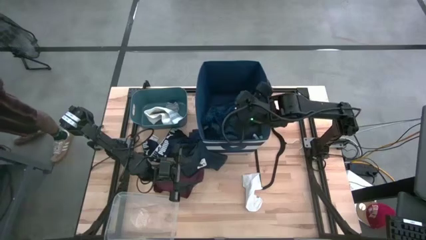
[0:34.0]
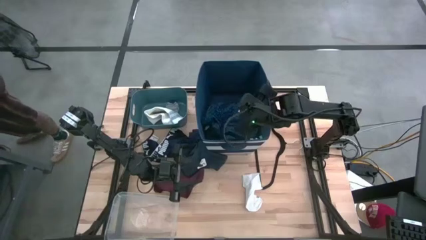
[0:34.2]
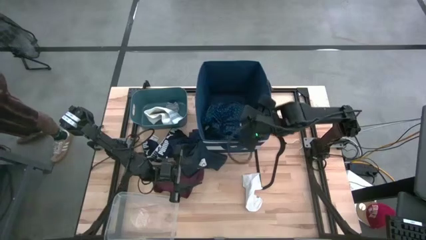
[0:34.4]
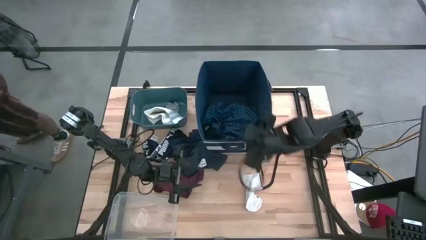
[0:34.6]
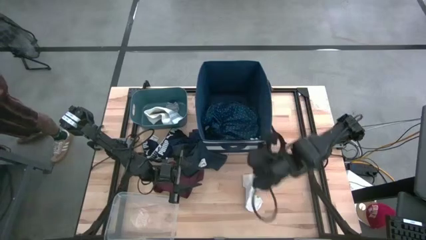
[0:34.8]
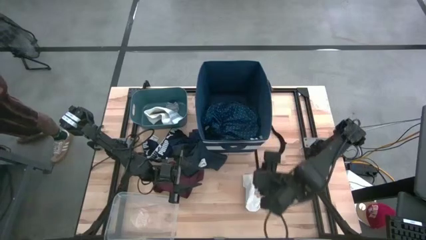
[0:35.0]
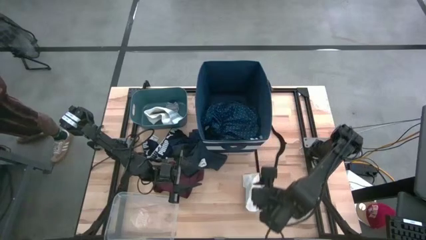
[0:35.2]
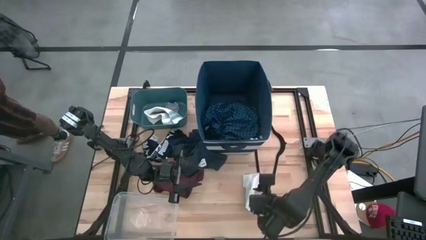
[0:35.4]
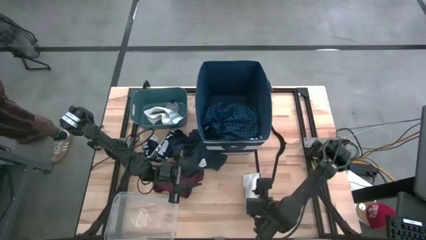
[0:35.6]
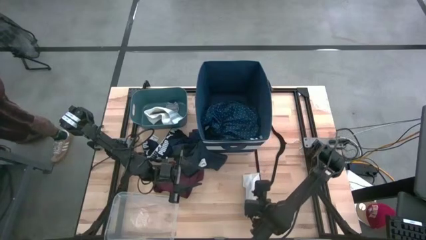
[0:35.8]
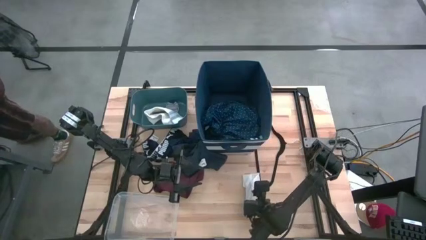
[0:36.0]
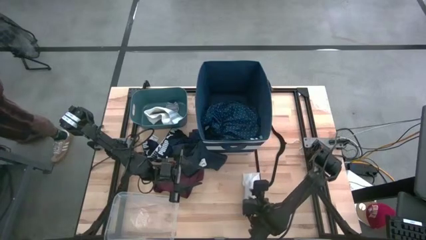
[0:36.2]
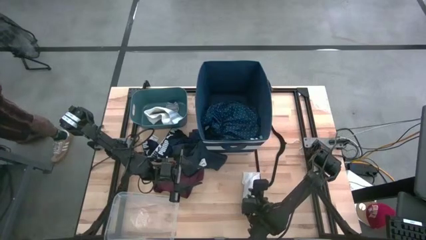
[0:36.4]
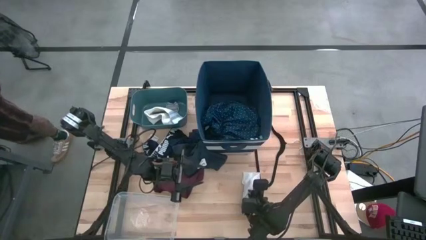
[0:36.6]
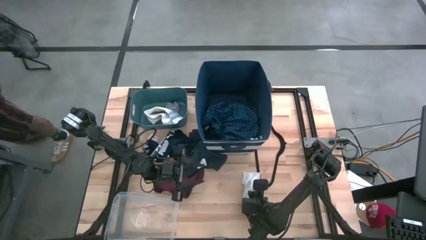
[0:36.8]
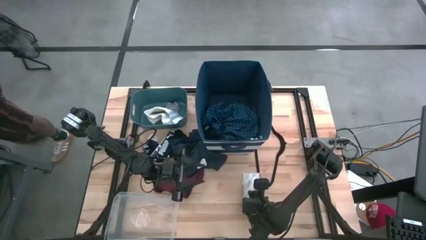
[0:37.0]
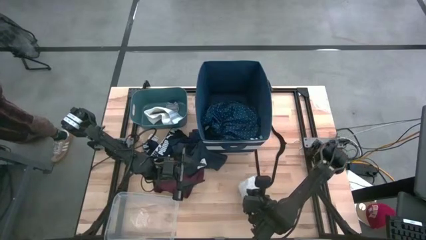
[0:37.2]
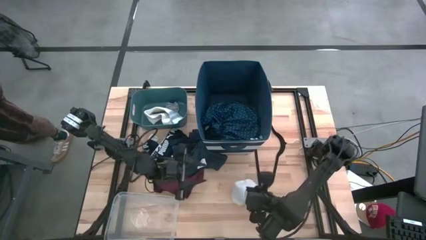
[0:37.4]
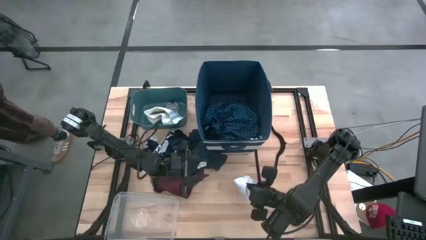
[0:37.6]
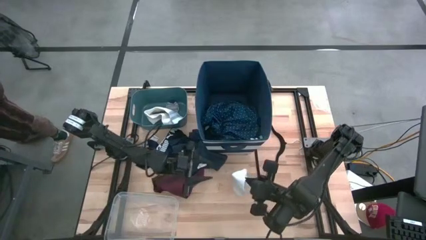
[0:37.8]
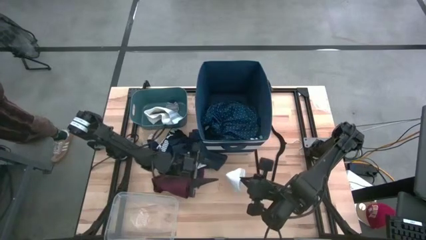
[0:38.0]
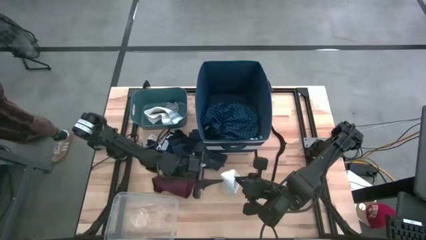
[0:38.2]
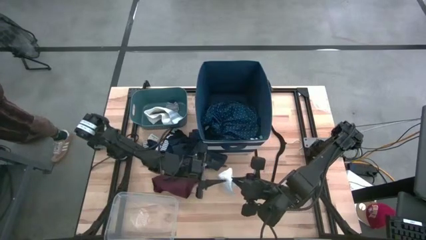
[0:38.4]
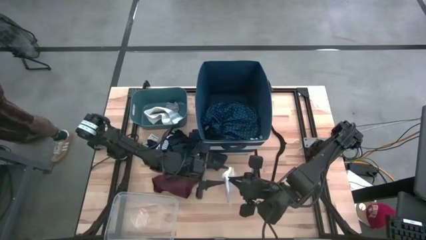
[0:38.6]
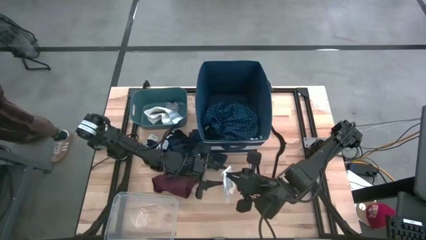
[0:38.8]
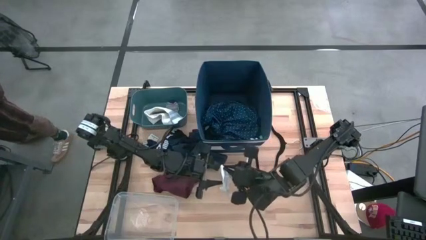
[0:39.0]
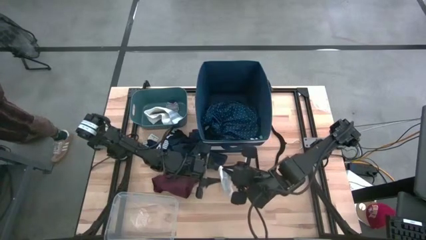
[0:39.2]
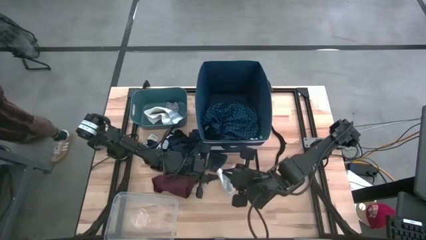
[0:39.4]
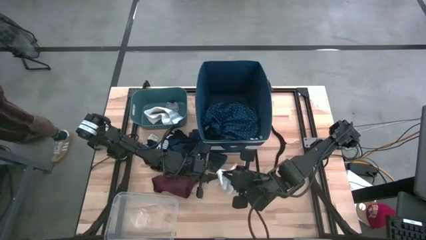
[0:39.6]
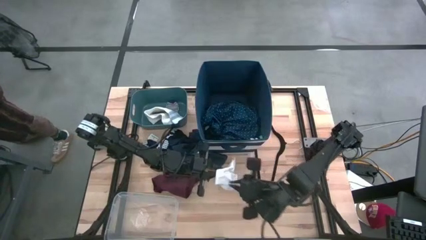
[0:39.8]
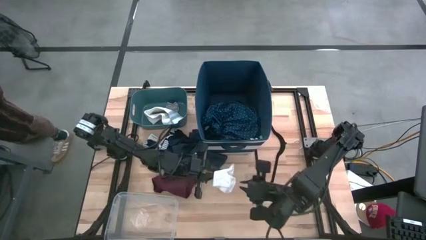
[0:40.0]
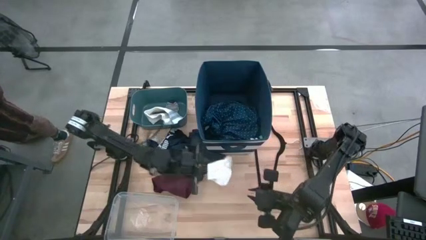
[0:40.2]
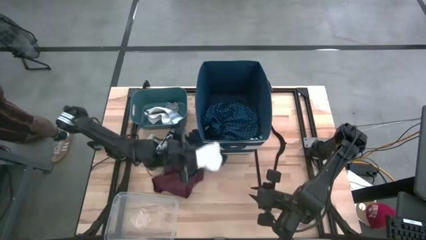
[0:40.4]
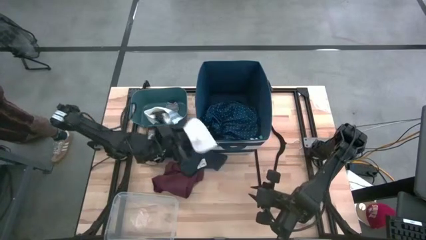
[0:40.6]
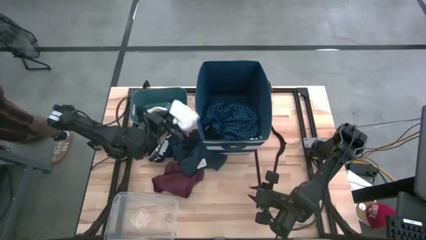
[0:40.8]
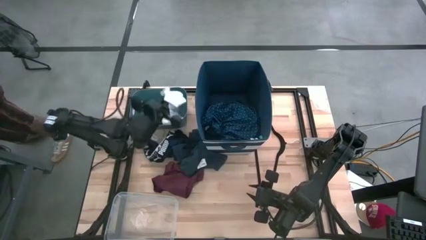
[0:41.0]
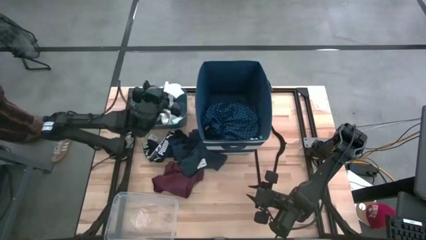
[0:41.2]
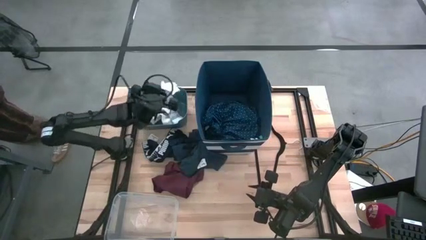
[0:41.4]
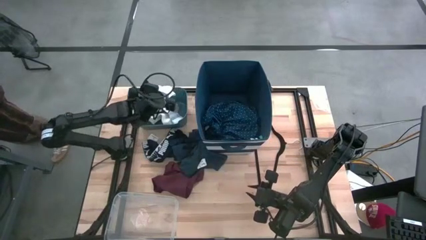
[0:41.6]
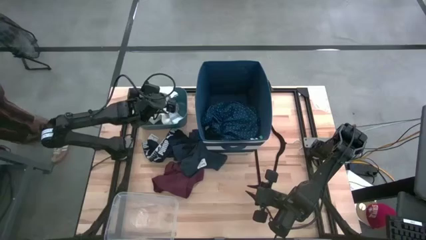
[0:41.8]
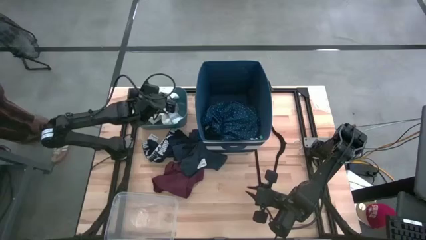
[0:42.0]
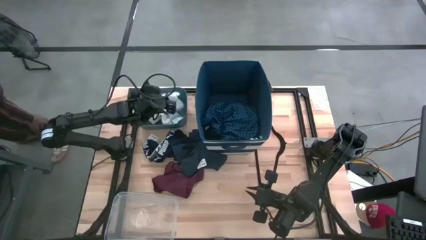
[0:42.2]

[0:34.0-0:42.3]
Task: Pick & Place Cloths
Put the white sock into the blue bin

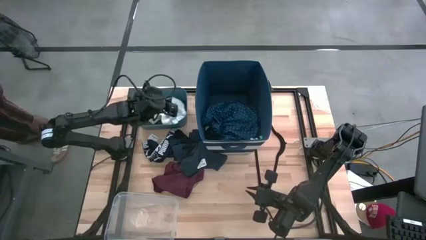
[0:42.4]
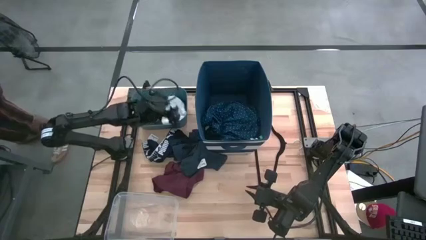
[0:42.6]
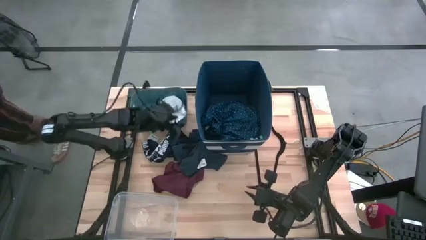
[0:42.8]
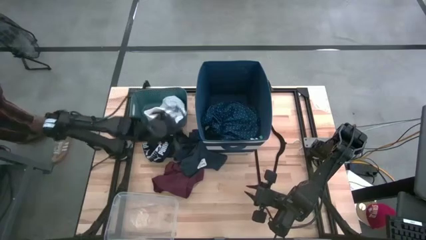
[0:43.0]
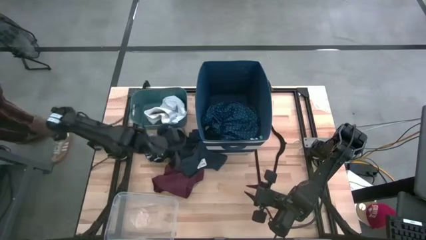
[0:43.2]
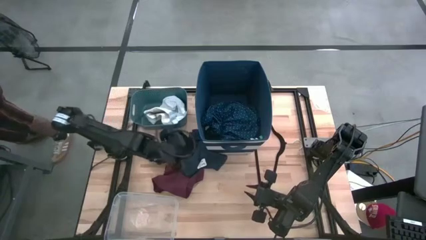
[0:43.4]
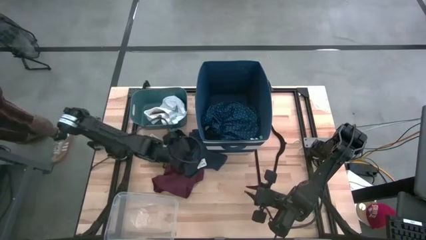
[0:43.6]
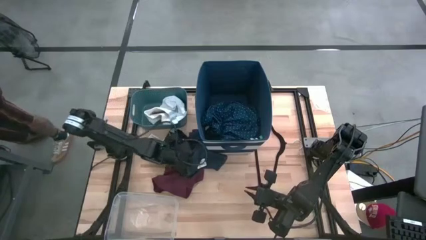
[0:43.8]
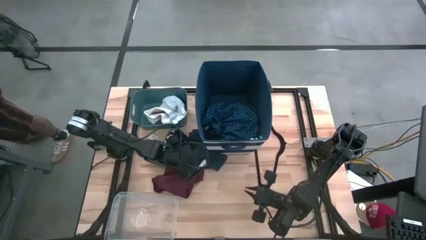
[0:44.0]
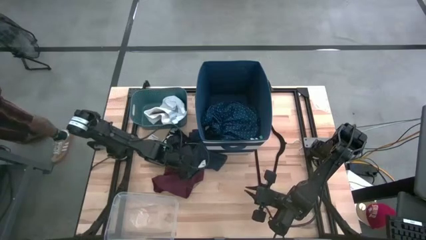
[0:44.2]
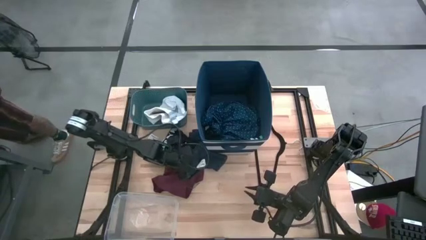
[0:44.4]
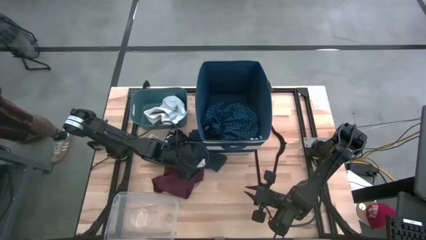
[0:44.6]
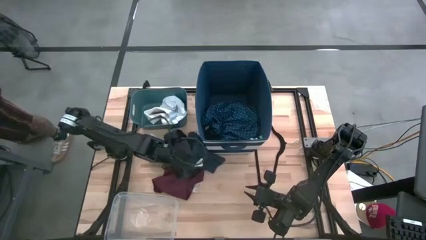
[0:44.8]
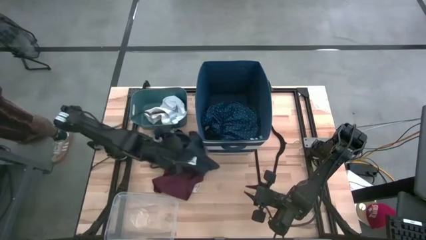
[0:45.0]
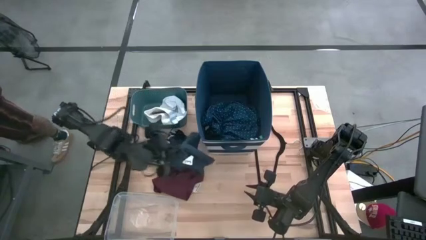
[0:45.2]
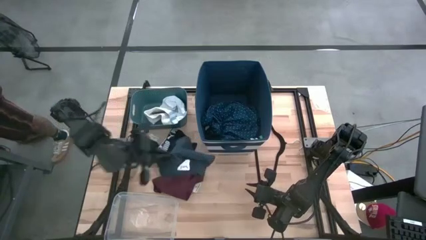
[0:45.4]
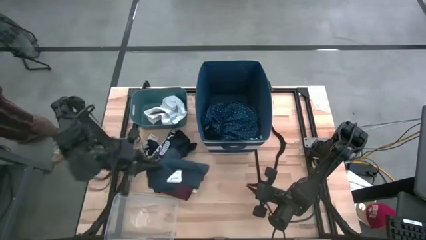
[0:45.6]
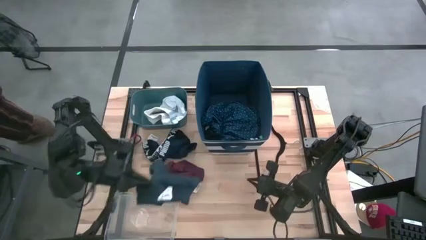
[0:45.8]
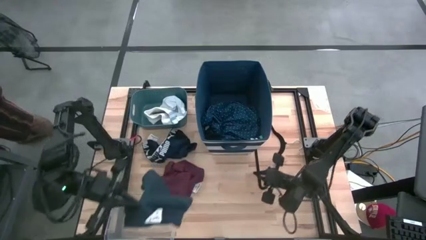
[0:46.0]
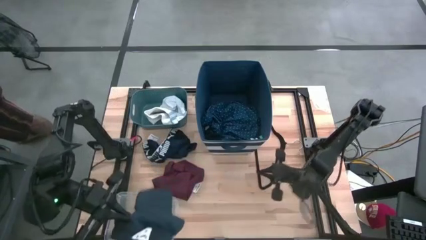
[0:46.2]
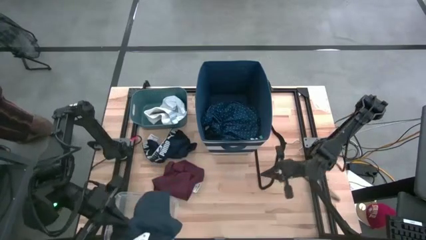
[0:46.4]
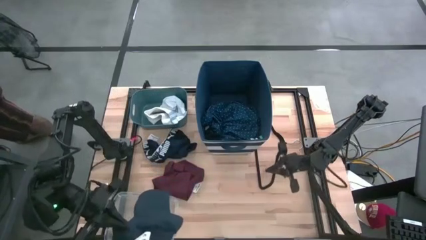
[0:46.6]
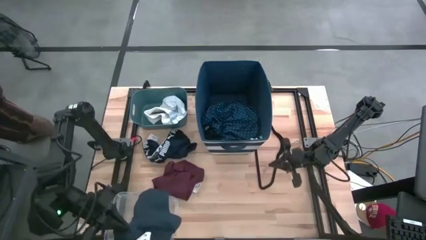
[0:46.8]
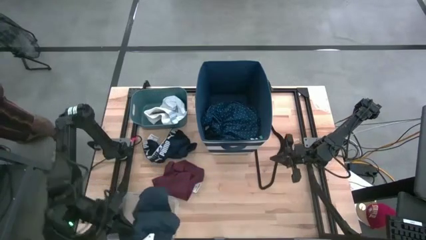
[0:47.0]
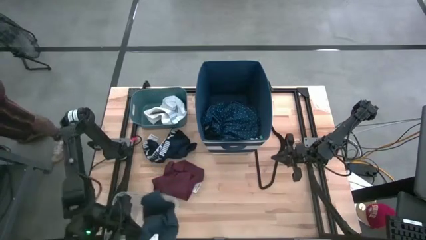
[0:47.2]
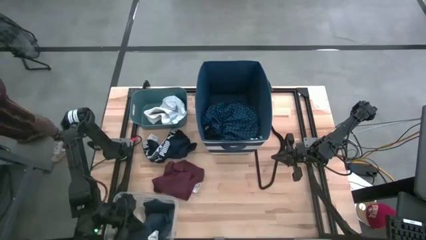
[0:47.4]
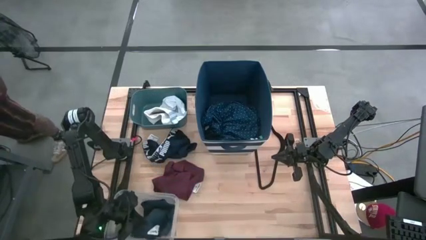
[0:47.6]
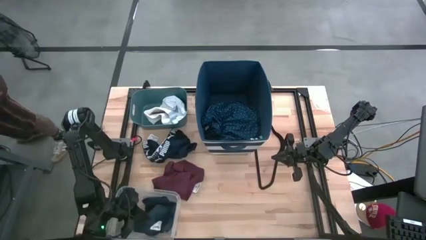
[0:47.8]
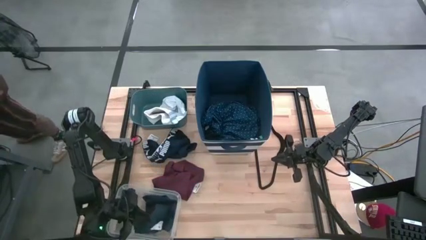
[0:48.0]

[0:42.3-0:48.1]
Put the dark blue shorts into the transparent bin

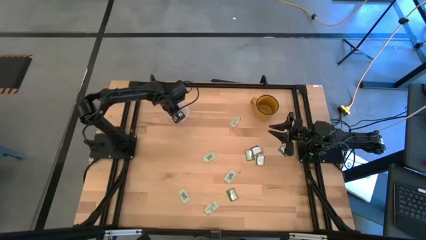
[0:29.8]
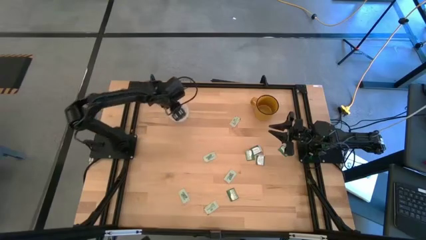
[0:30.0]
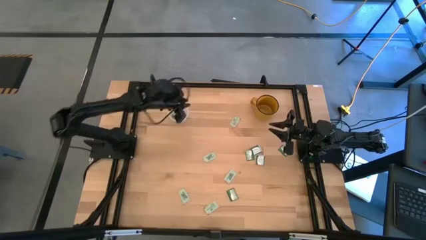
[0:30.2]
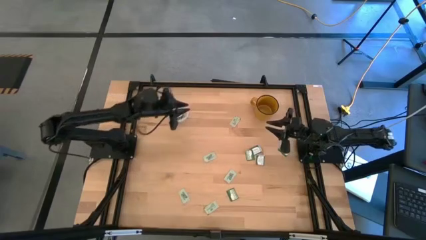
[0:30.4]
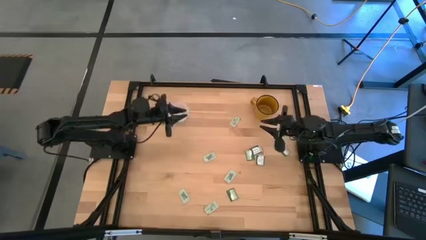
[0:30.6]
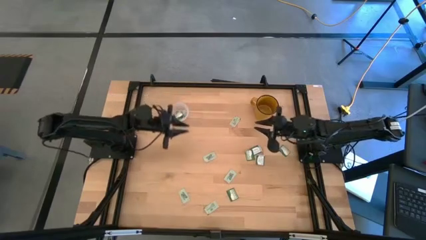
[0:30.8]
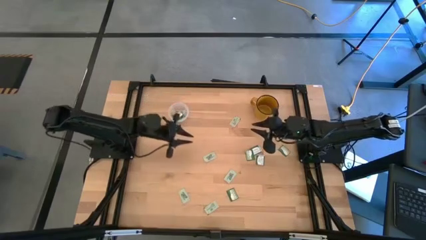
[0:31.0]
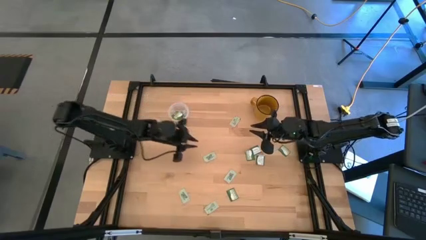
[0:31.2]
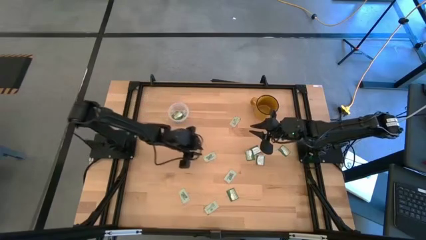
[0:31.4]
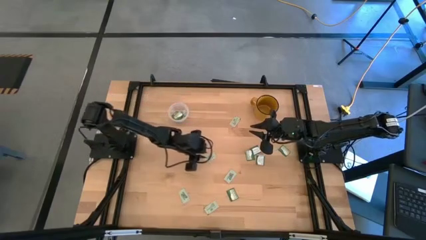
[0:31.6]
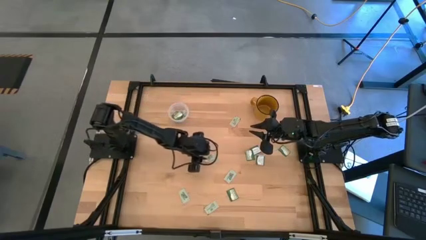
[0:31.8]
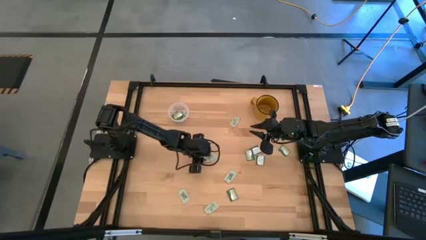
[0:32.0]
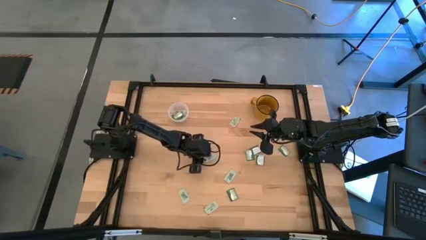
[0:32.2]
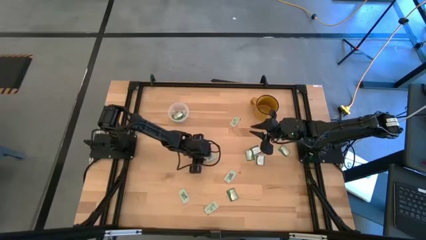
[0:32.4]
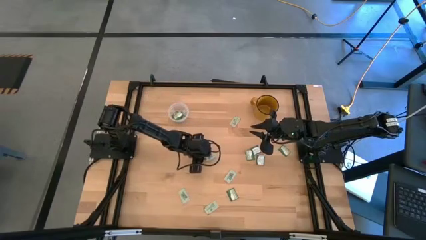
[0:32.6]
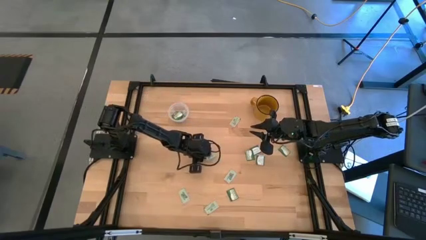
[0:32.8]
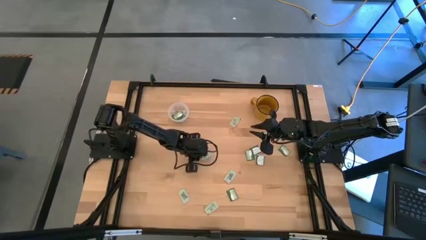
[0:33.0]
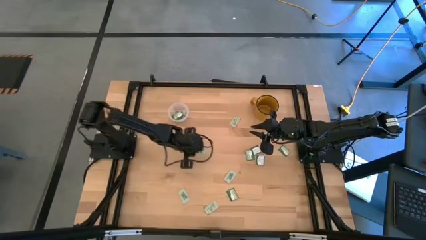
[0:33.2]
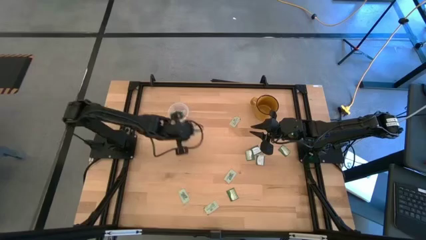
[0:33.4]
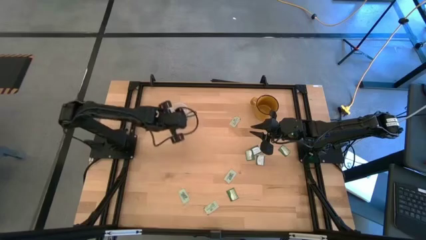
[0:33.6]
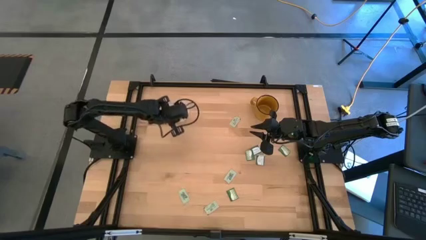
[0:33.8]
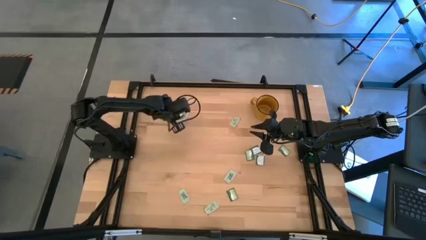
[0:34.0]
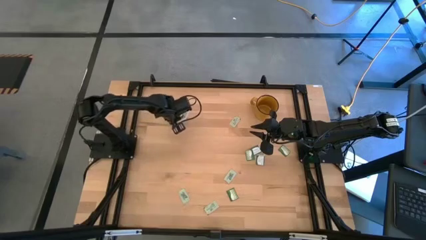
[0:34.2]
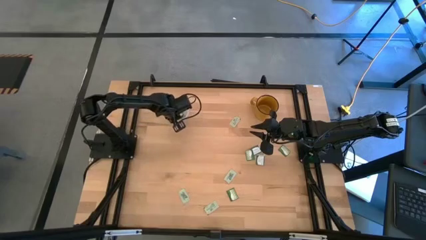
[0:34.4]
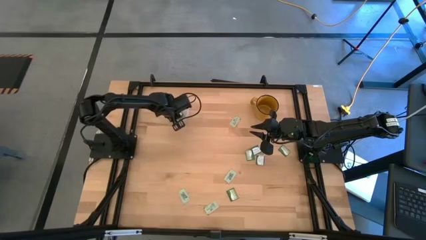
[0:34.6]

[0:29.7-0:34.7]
Task: Pick and place Stevia / Truvia into bins
Put the stevia packet into the transparent container
